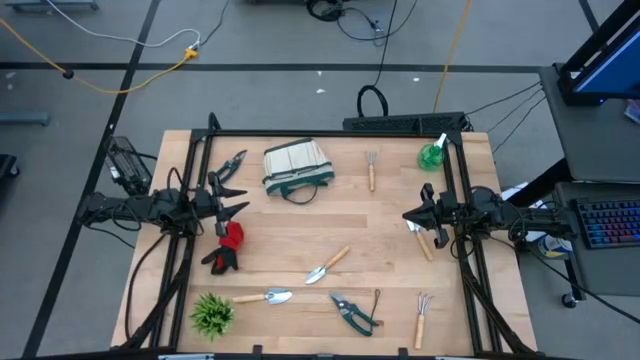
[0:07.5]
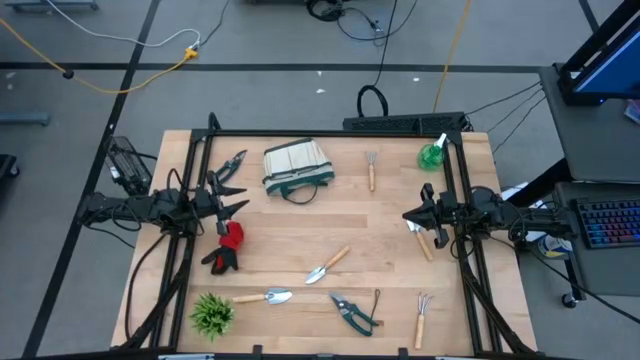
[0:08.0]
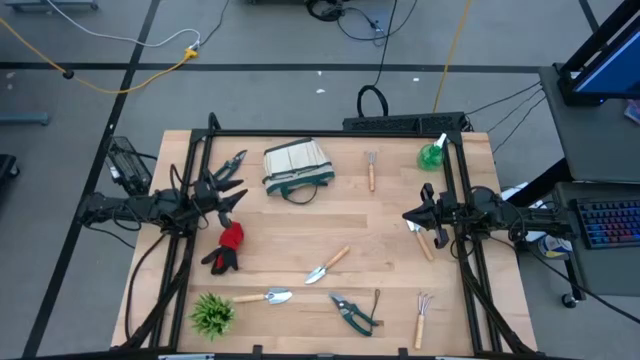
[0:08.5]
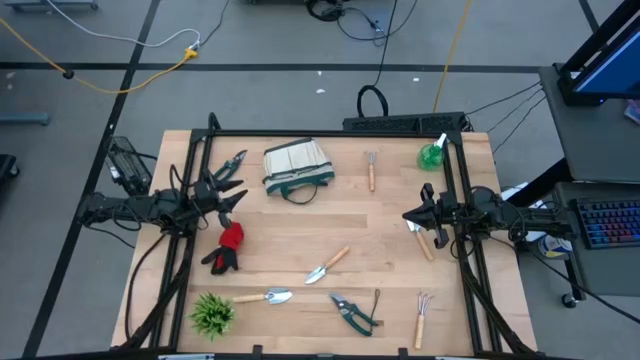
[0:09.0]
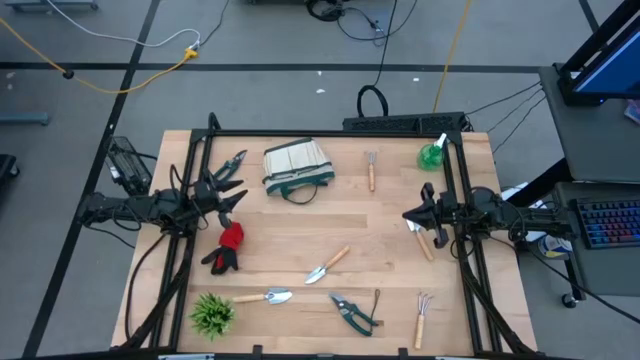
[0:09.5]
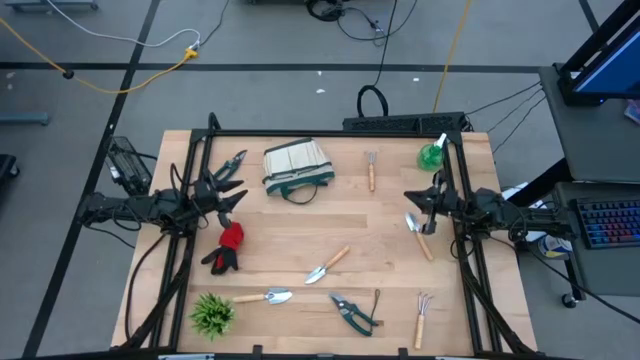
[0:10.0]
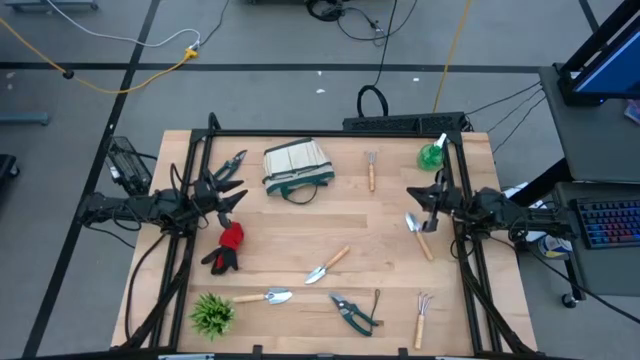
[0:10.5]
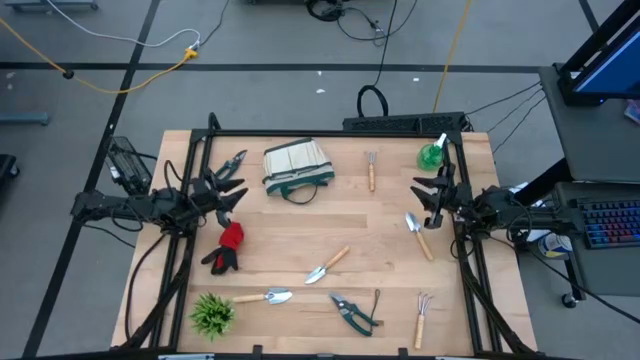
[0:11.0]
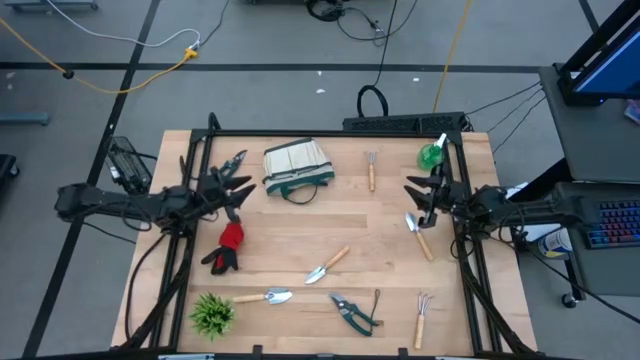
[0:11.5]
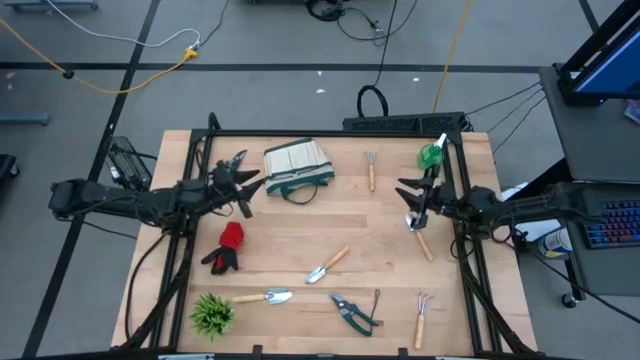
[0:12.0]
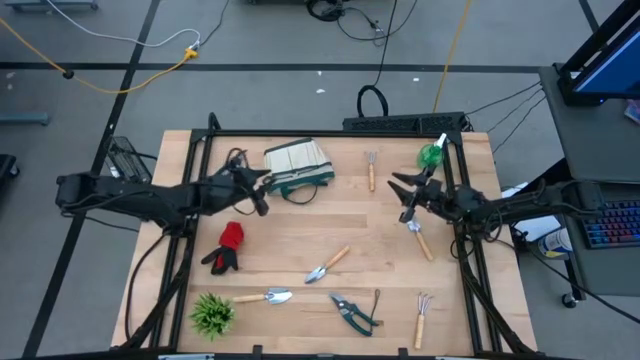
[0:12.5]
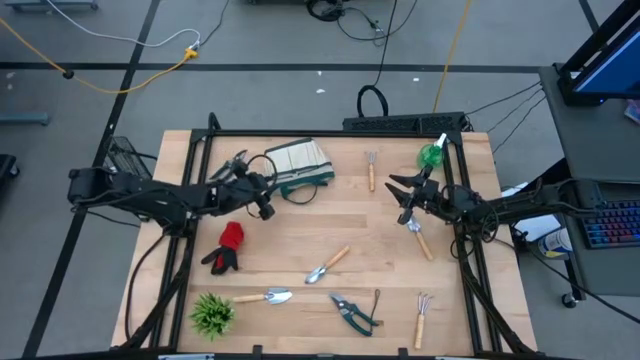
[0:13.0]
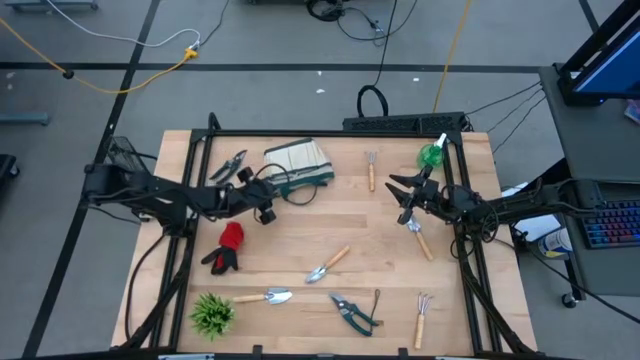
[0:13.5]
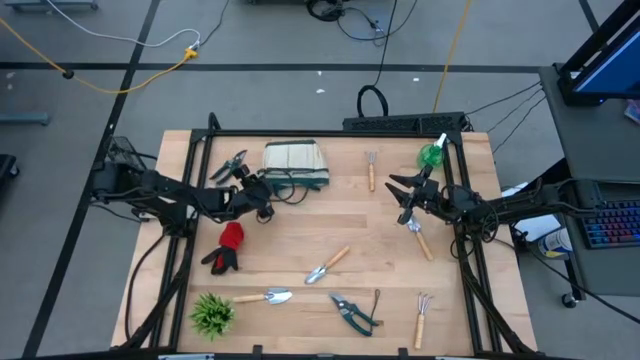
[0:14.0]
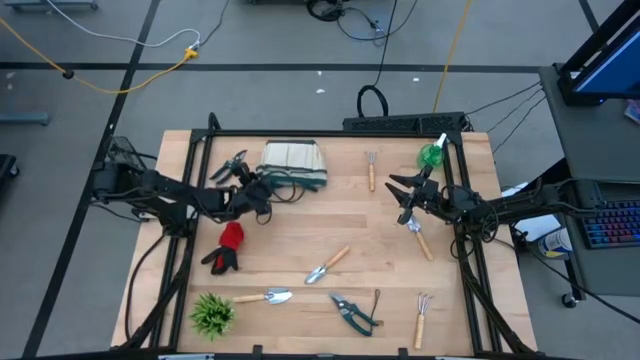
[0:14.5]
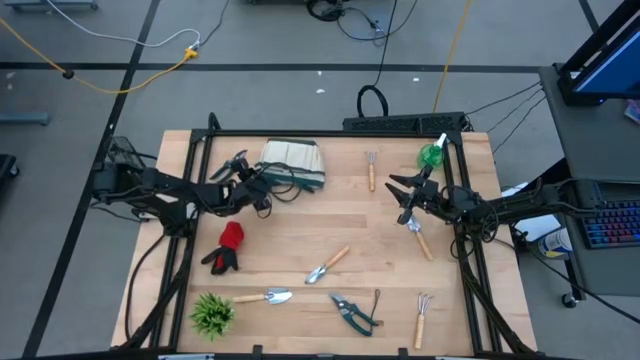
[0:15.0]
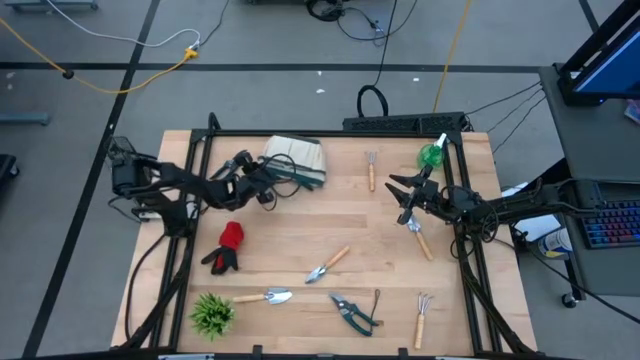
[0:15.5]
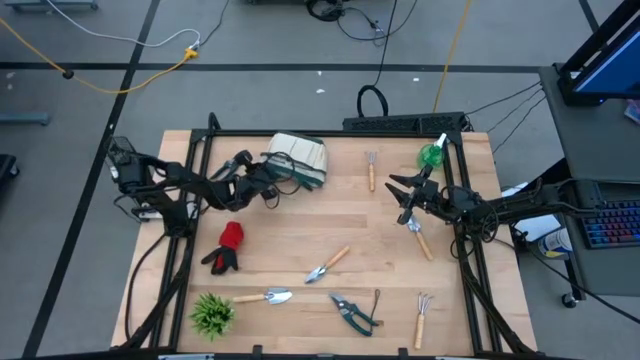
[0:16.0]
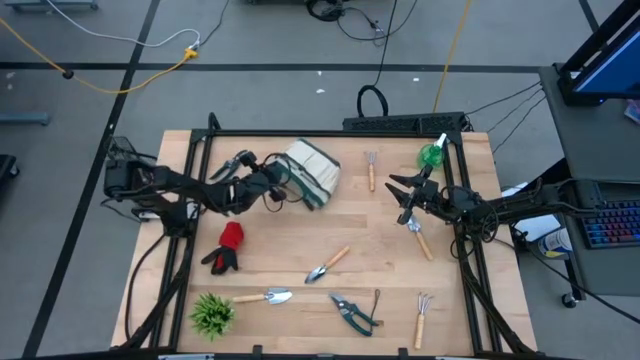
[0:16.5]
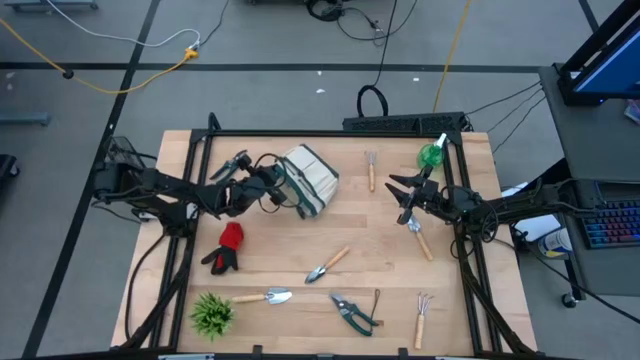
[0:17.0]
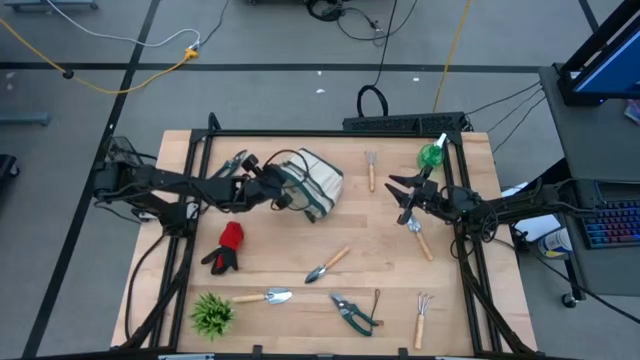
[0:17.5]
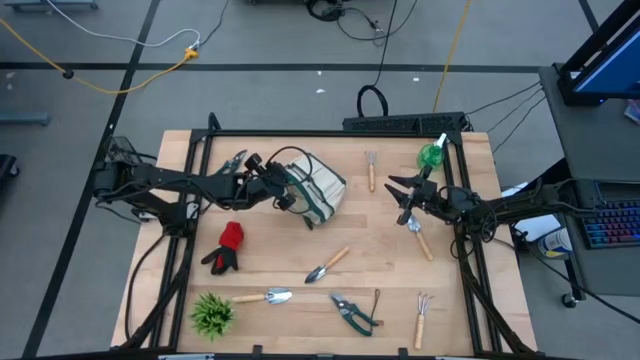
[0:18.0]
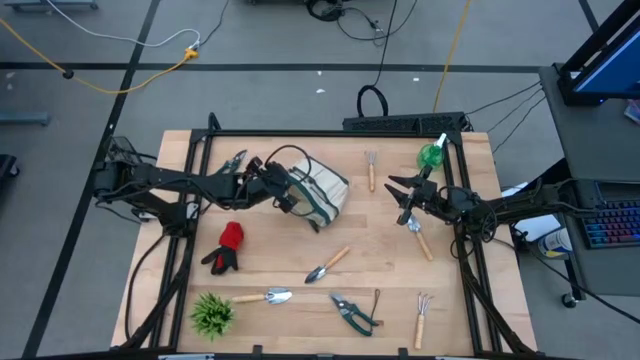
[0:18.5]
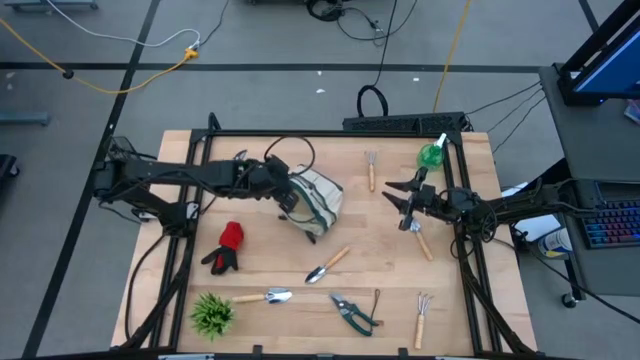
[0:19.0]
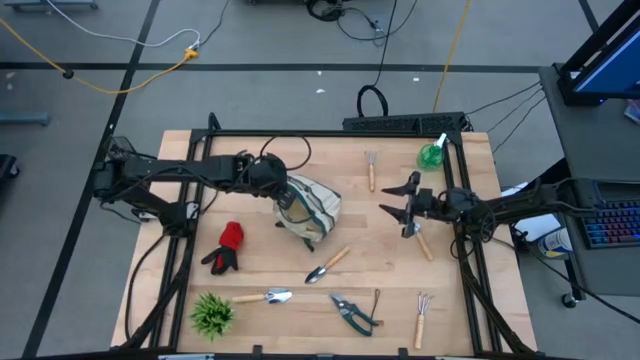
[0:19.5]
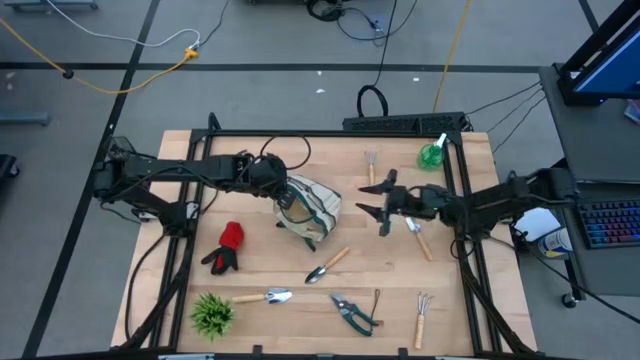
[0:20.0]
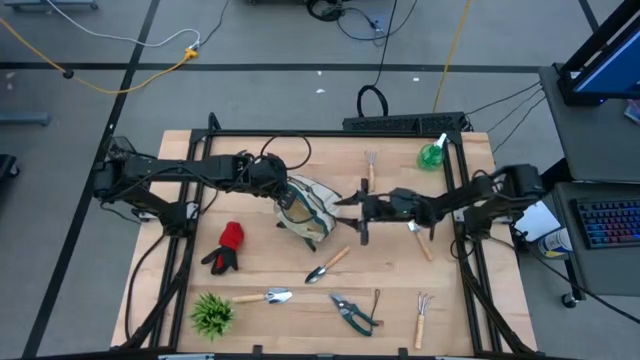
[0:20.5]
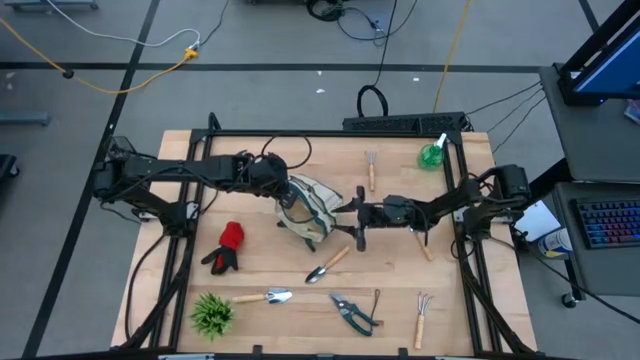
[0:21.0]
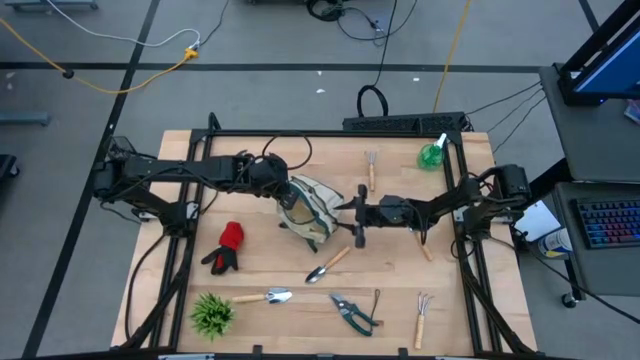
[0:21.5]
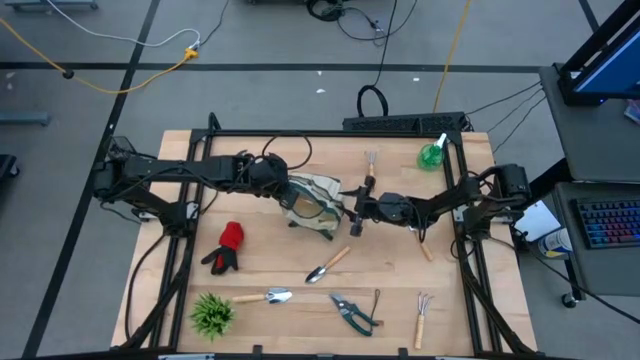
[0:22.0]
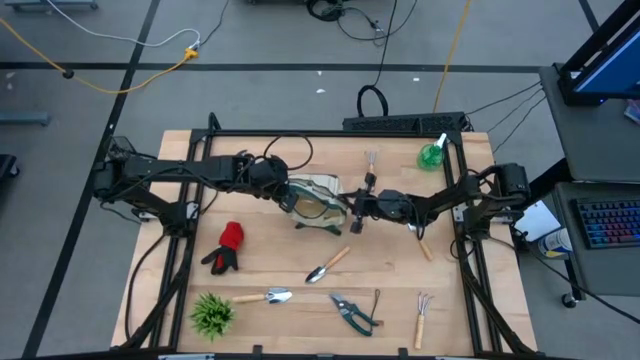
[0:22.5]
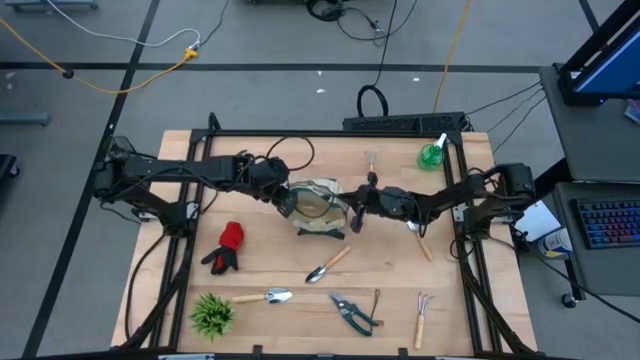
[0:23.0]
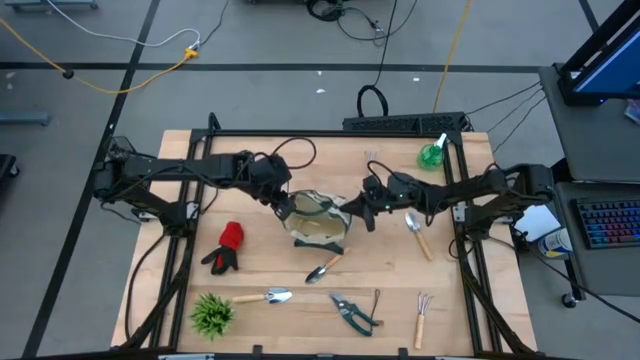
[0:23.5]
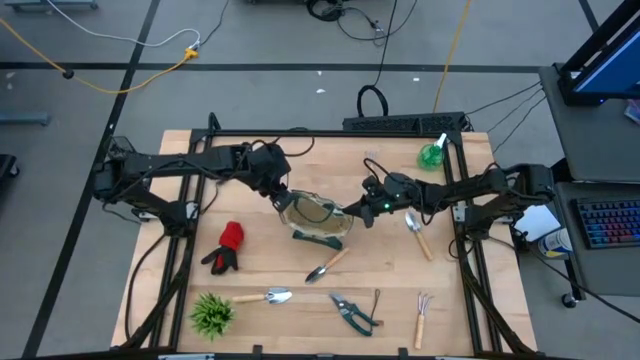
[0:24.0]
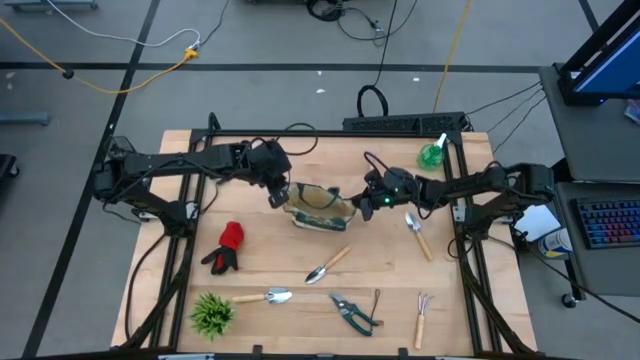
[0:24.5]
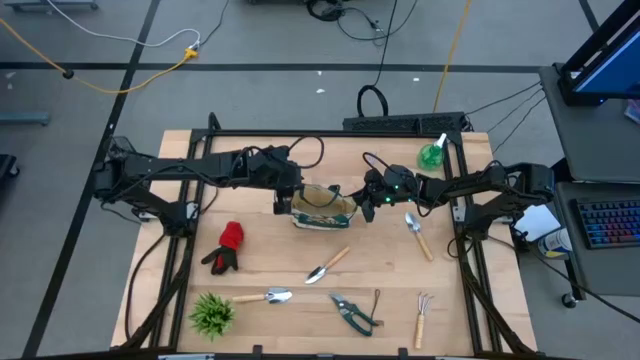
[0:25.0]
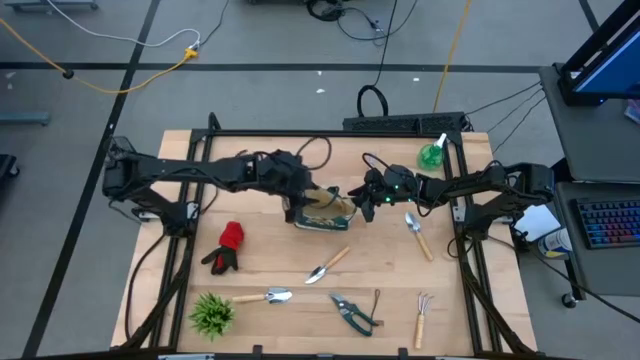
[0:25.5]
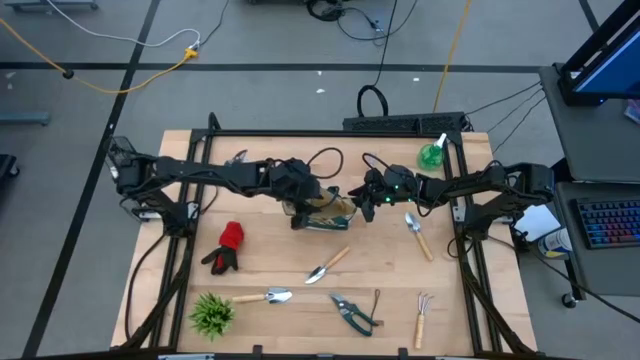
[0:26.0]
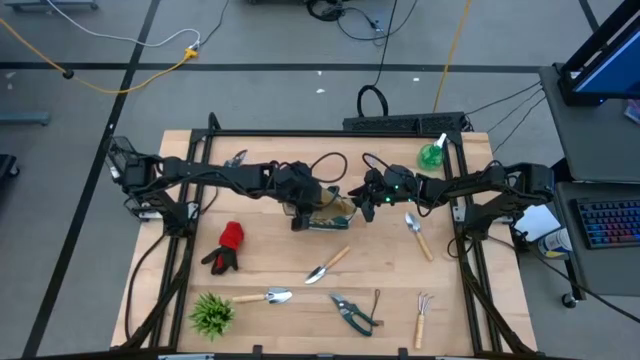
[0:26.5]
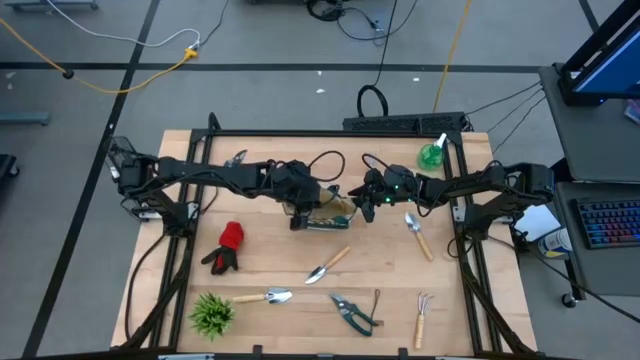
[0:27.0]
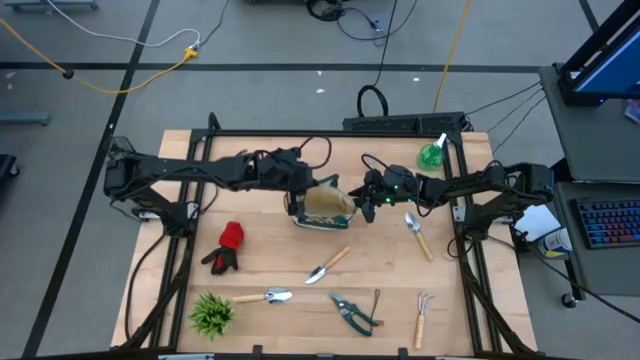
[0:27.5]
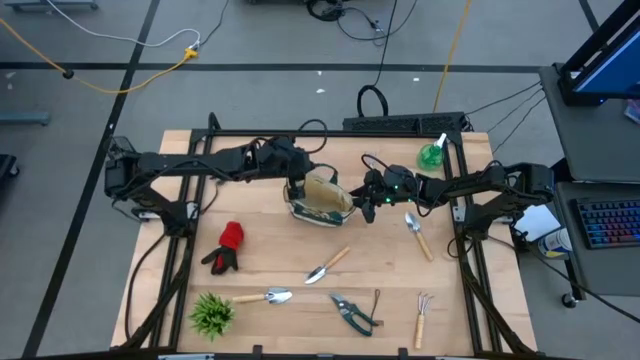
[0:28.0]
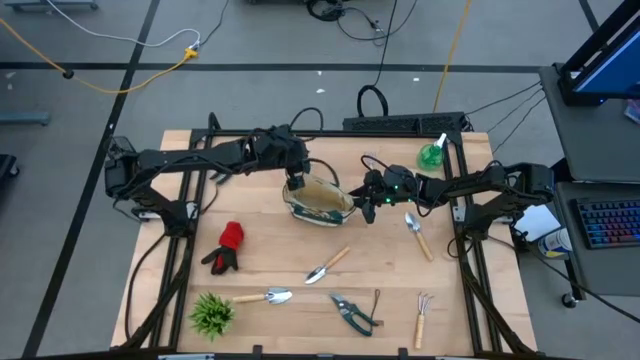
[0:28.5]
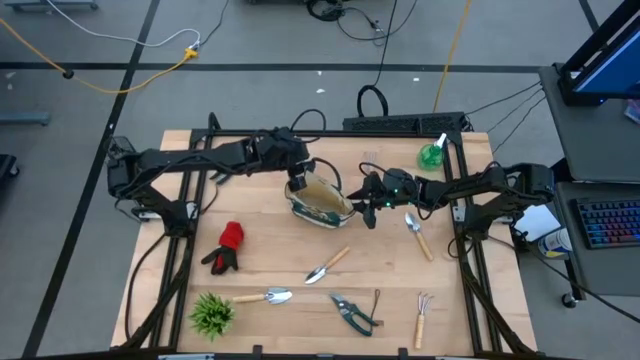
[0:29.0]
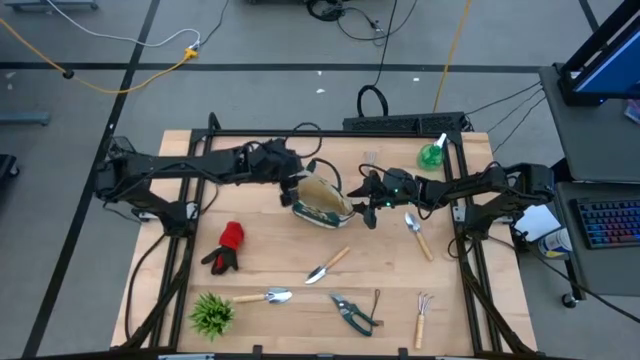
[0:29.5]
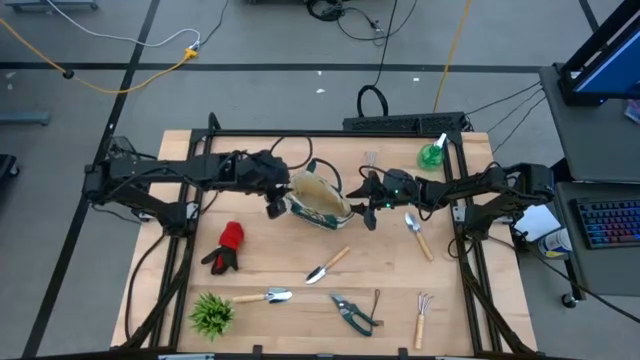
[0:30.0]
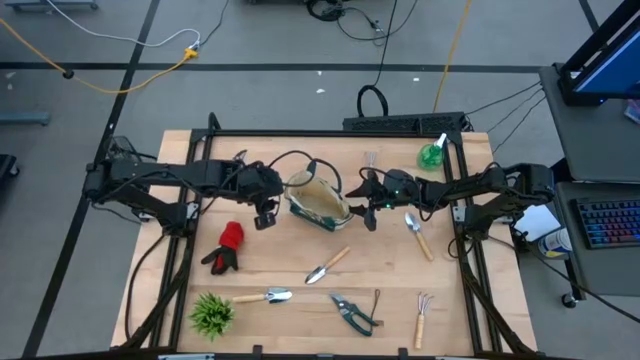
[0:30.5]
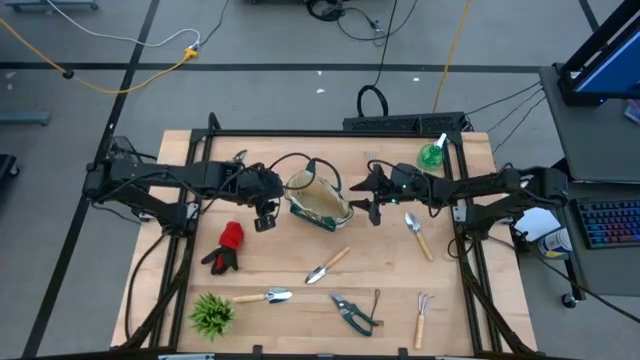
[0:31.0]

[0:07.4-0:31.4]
Task: Pick & Place Garden tools in Gardening bag
Prepare the gardening bag
